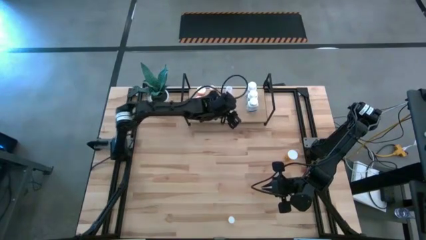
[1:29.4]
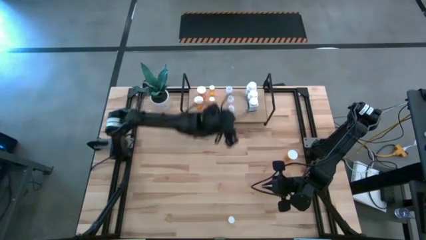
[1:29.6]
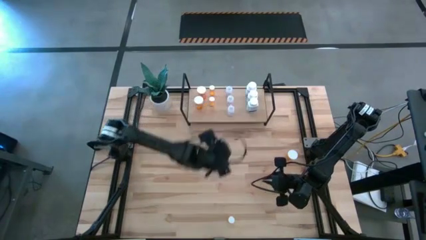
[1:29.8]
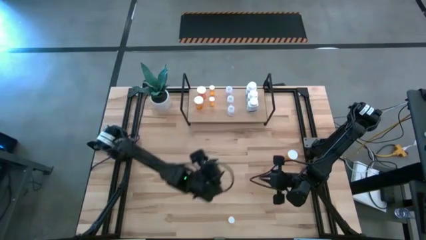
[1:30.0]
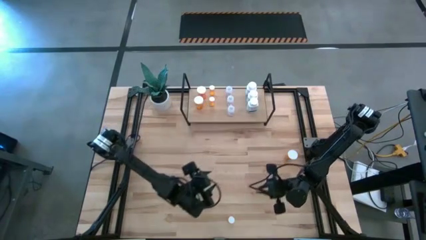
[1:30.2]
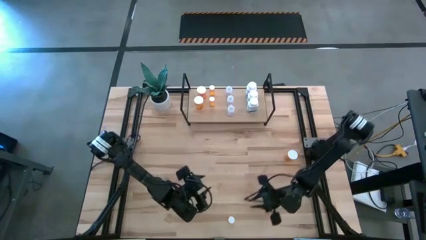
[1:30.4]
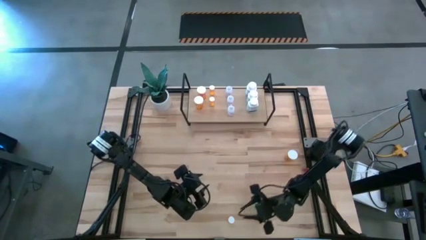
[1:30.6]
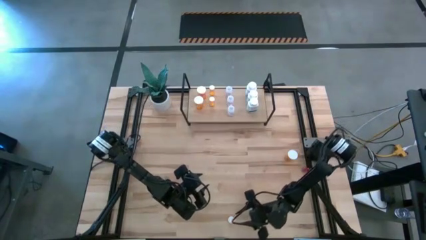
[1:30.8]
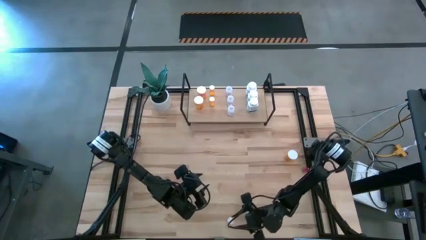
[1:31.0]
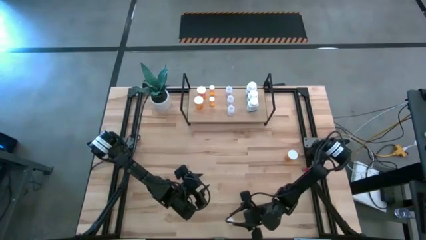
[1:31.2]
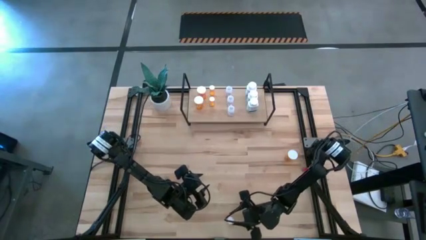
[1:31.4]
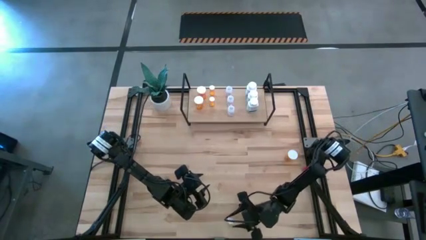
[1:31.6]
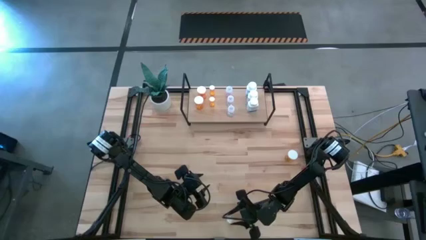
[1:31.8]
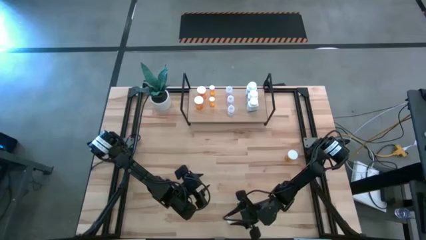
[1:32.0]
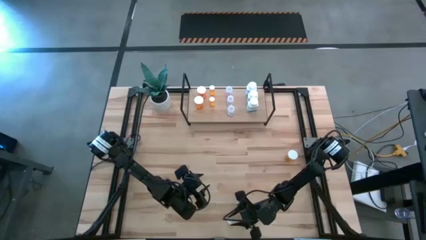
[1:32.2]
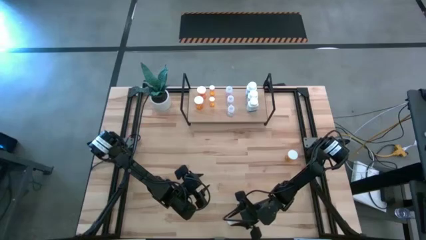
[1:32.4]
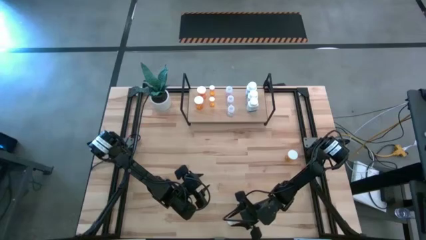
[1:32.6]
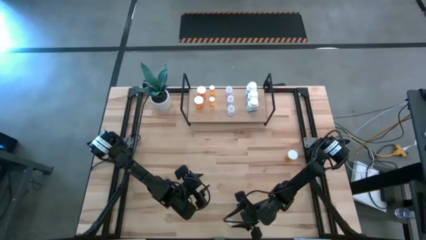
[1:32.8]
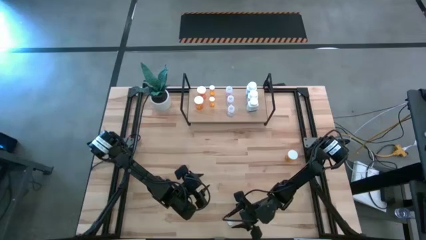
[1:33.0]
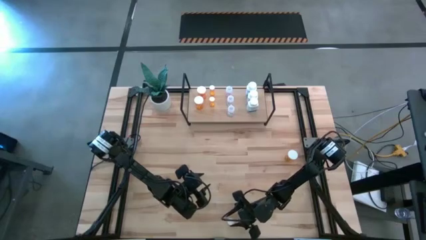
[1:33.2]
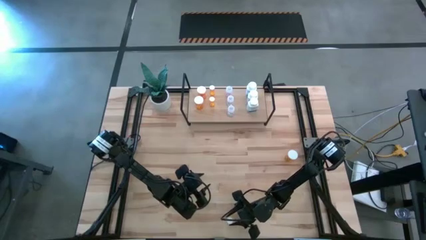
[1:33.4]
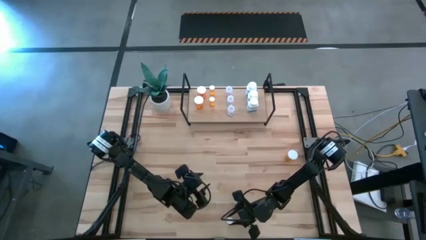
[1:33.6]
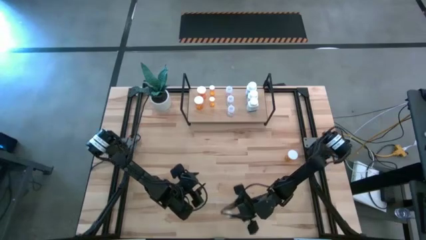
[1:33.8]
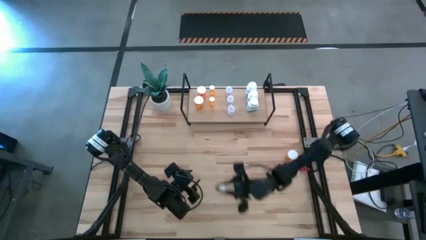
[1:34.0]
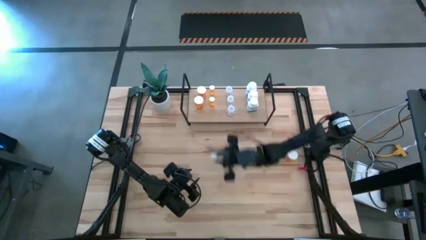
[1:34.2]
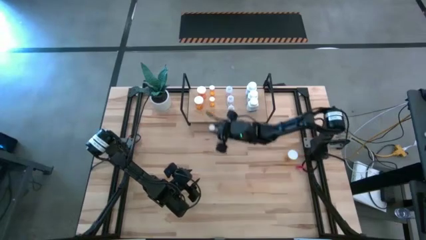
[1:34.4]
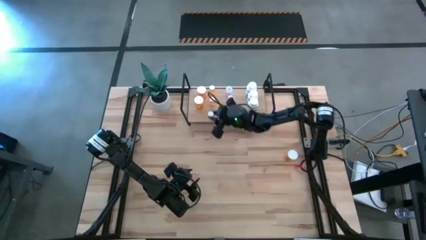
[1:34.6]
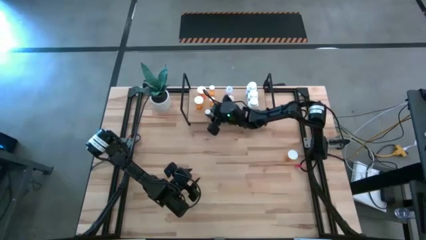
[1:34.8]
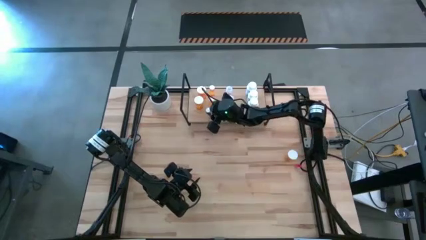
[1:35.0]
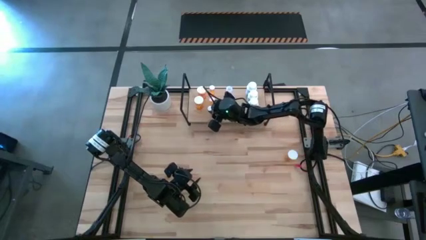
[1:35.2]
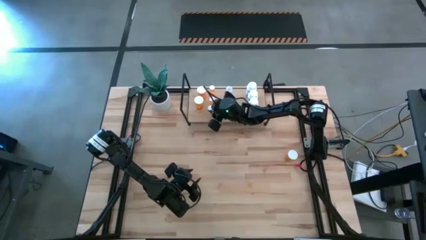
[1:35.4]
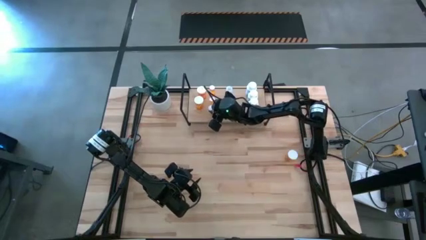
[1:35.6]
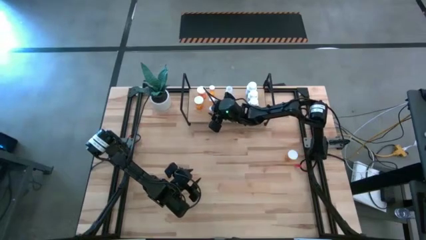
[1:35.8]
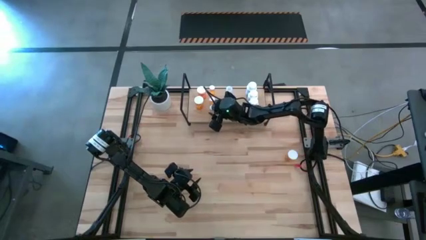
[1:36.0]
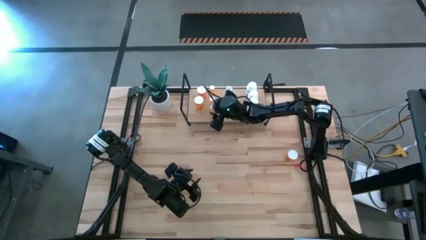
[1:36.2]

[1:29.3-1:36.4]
Task: Pick and place medicine bottles onto shelf by color
Put the small orange pill bottle on the shelf aligned with the small orange pill bottles

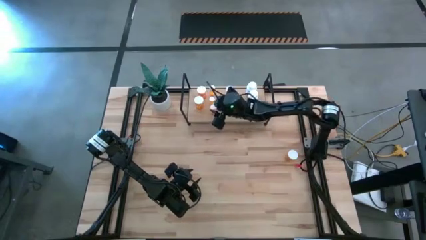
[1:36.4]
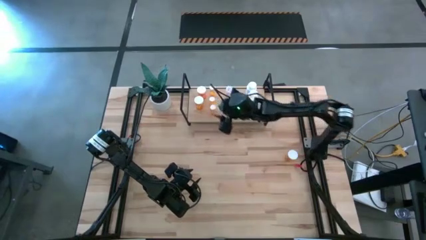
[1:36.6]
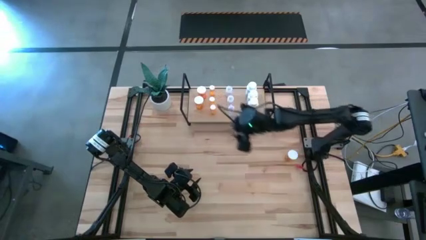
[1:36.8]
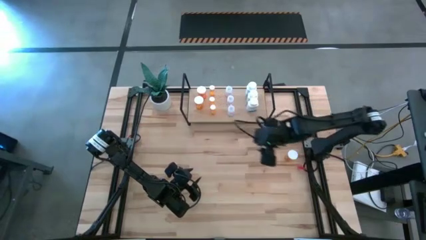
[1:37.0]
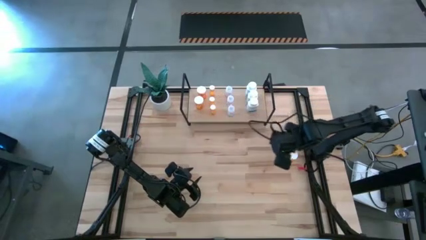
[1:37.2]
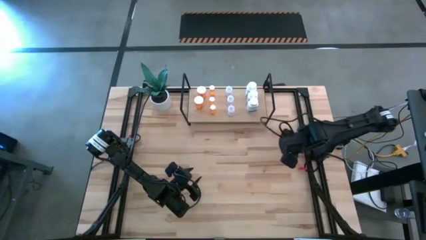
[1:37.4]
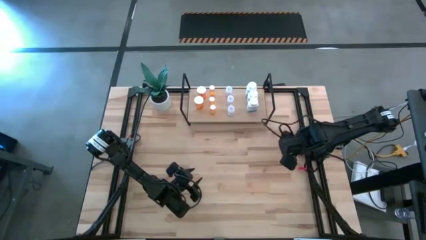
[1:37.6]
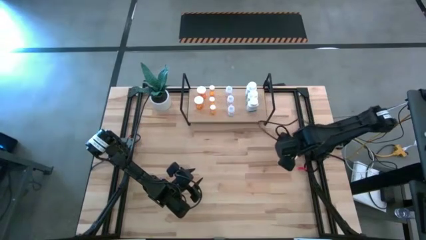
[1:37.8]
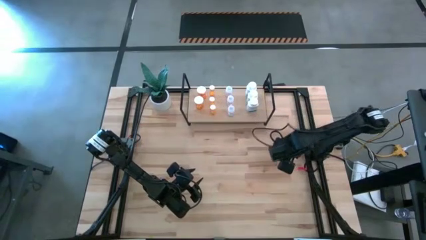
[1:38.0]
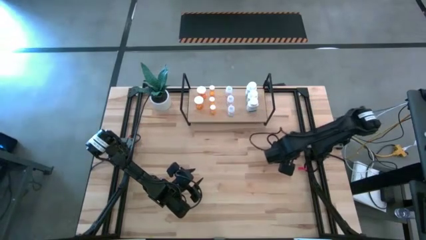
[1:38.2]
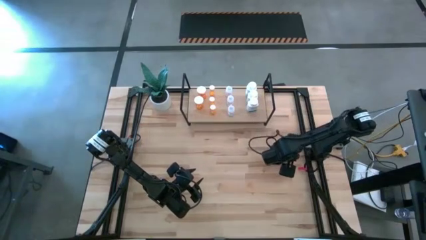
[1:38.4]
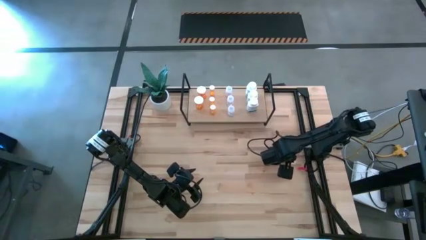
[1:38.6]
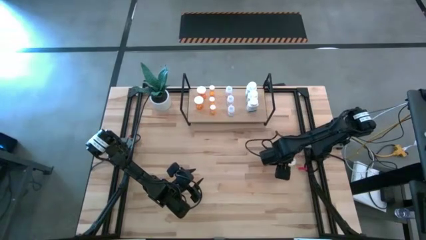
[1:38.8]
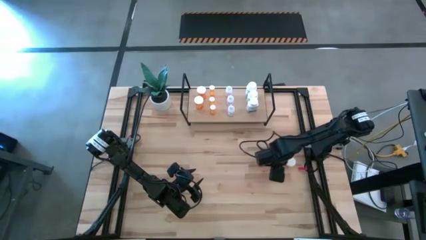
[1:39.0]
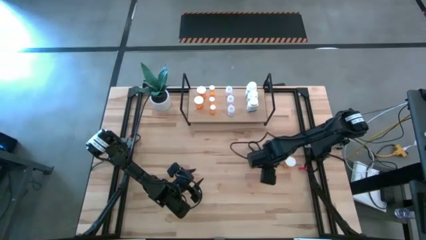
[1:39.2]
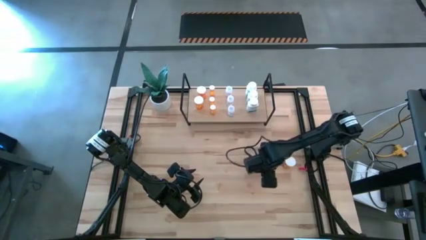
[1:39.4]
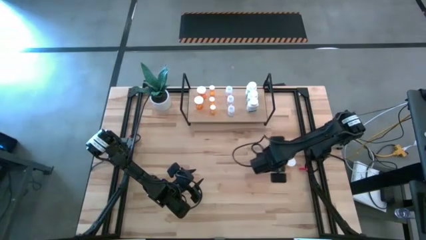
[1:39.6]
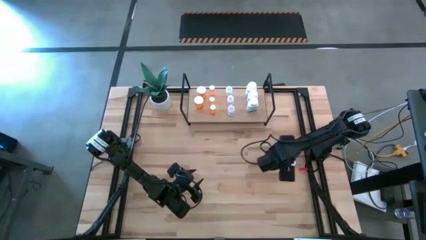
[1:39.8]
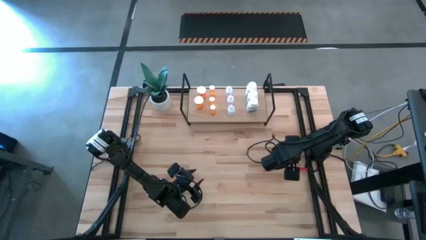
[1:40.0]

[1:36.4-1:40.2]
Put the large orange pill bottle on the shelf aligned with the large orange pill bottles

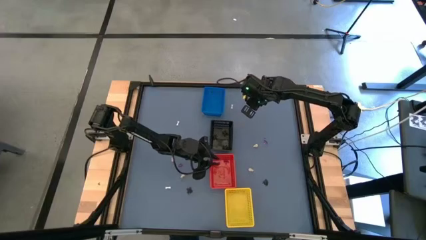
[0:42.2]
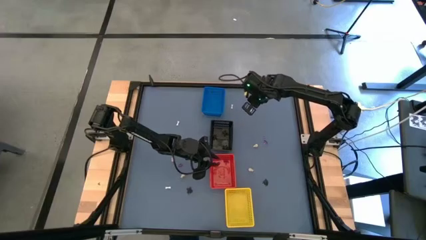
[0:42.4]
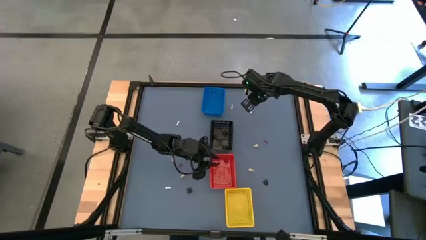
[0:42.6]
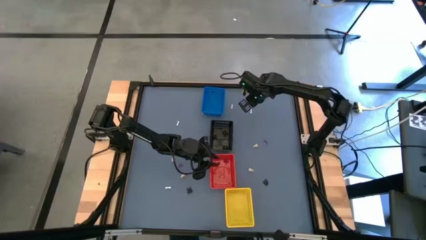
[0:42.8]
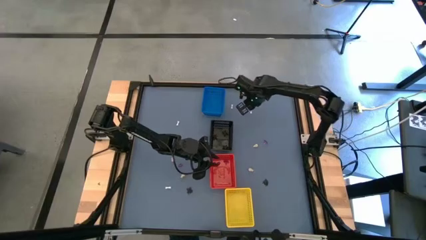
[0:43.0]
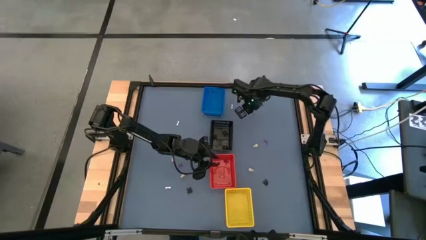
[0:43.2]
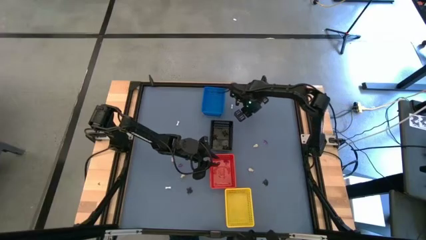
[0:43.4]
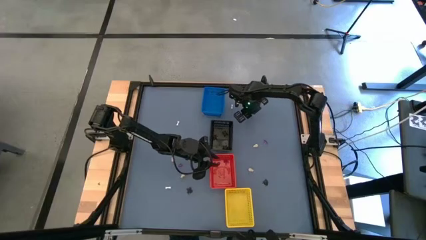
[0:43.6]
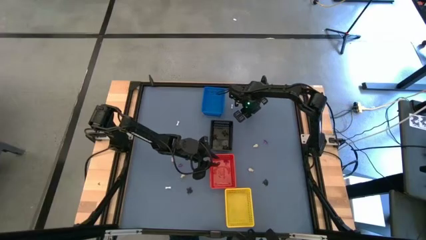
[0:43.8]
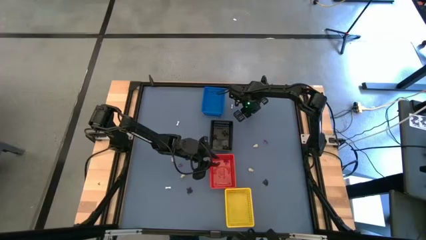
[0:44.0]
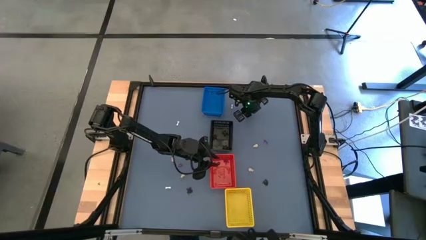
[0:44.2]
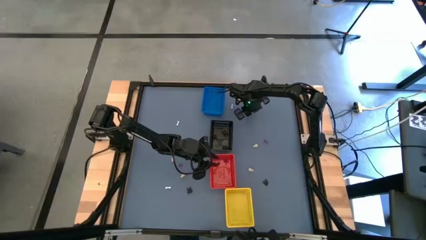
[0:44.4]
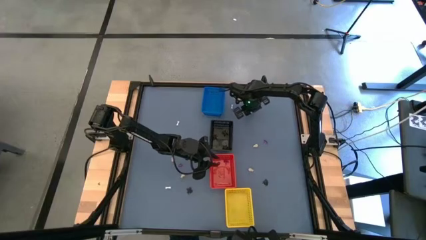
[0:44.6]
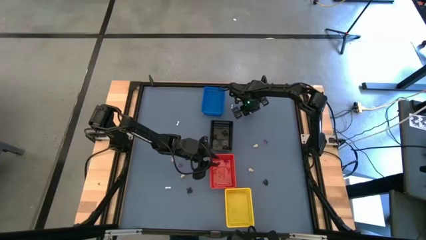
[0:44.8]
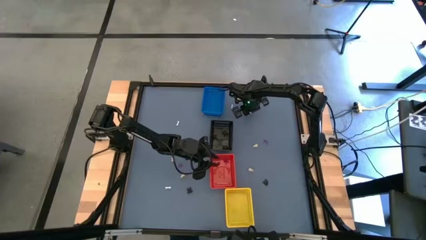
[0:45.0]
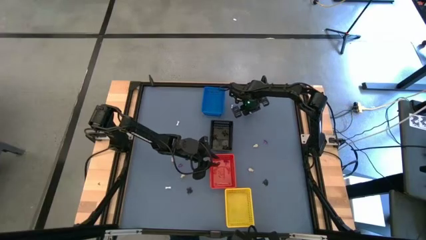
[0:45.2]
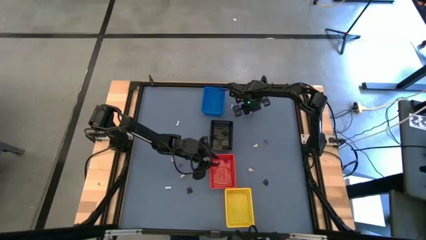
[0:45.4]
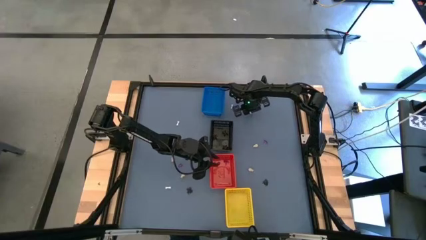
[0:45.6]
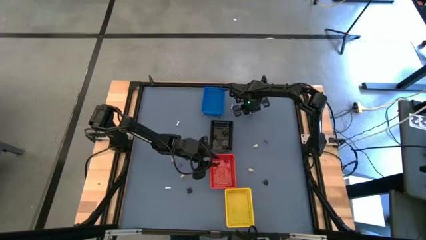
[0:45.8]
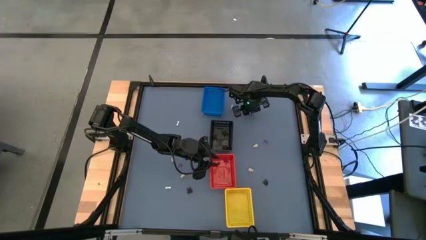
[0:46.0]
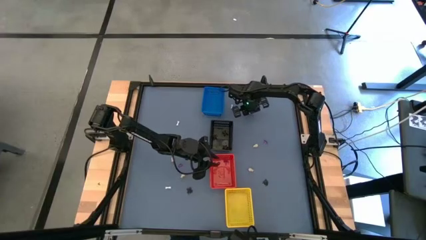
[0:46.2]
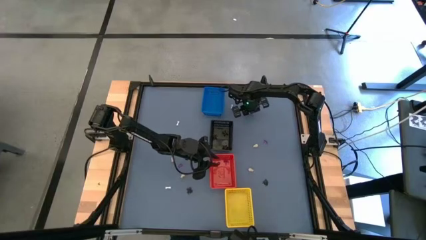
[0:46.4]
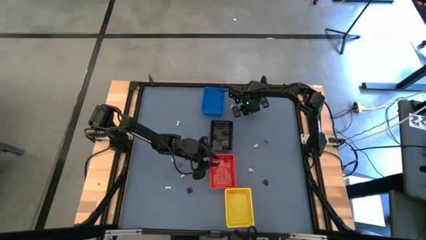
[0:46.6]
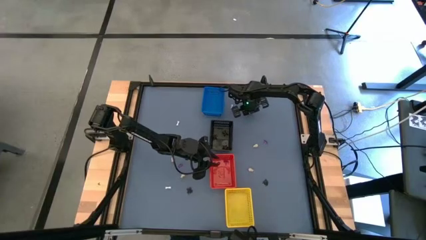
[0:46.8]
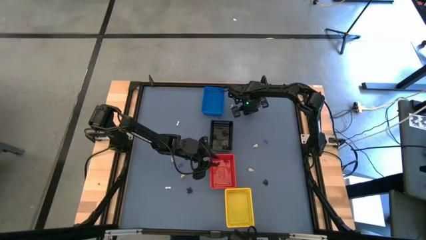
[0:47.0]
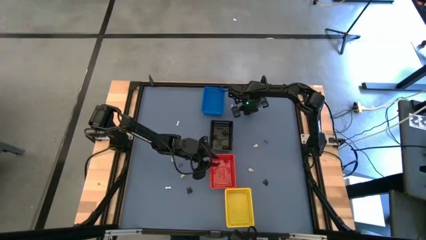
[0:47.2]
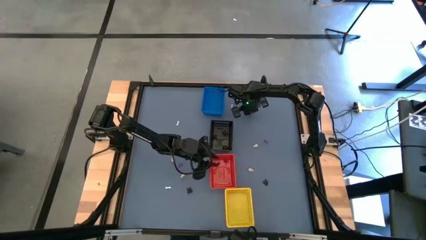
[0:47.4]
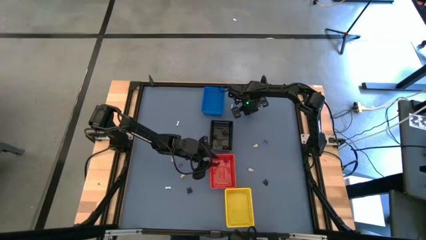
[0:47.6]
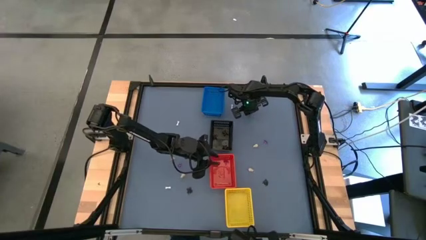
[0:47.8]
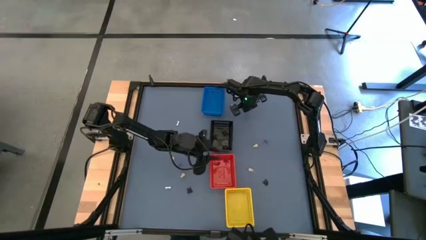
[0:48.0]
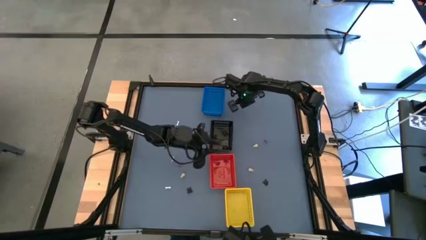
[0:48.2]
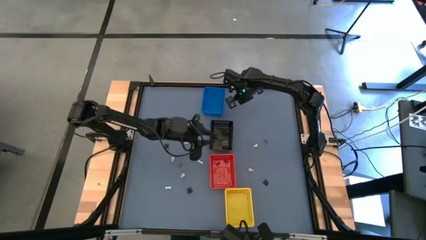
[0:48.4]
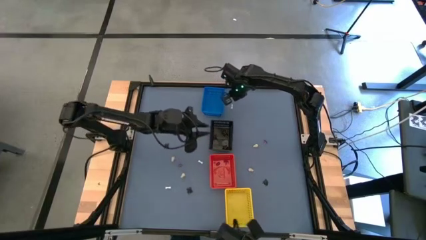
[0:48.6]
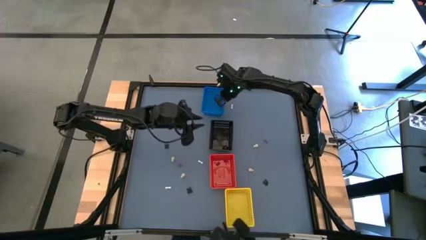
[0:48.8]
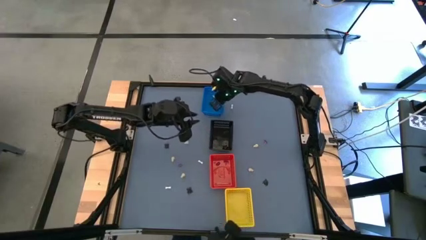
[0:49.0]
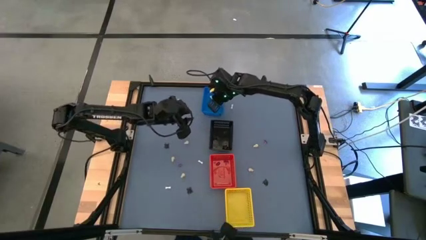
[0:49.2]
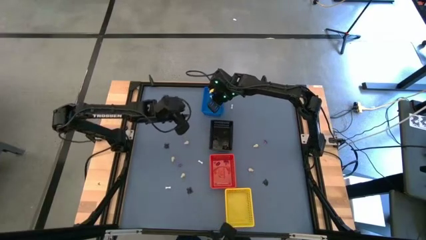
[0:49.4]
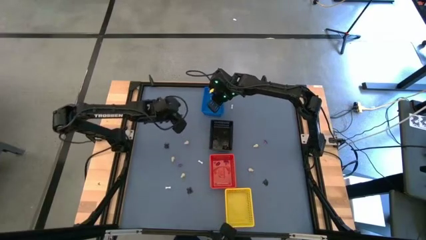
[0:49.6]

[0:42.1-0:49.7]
Task: Sort Halloween decoration
Put the white bone toy into the blue bin
